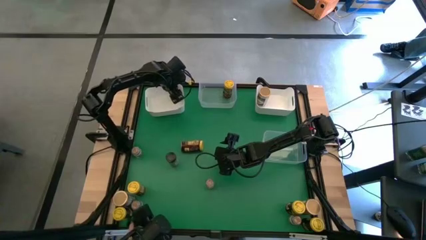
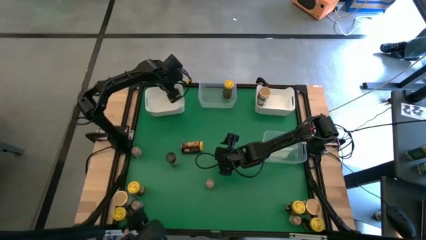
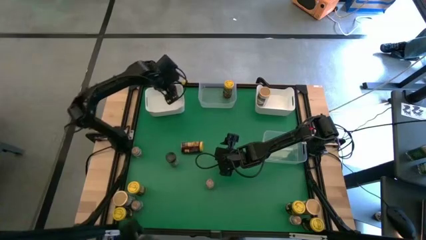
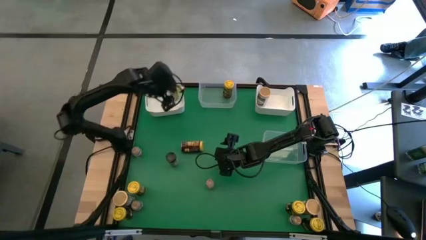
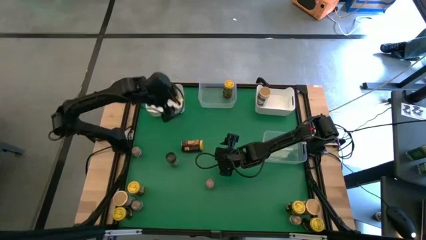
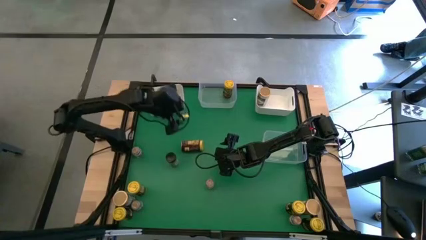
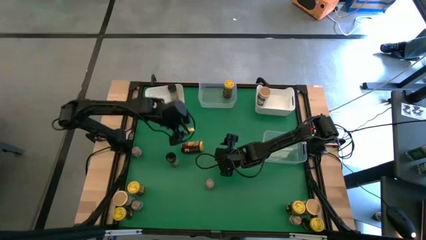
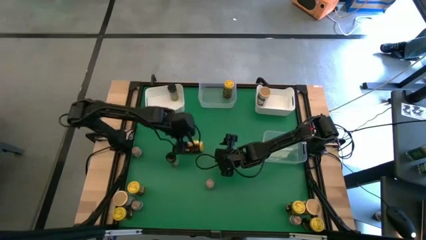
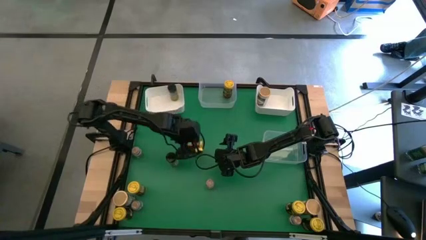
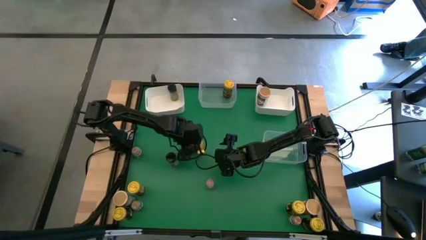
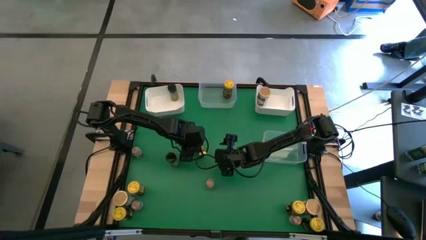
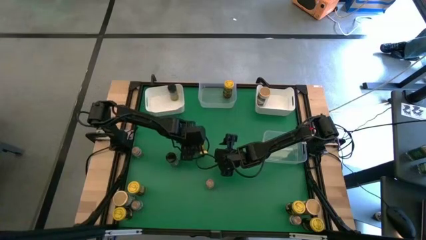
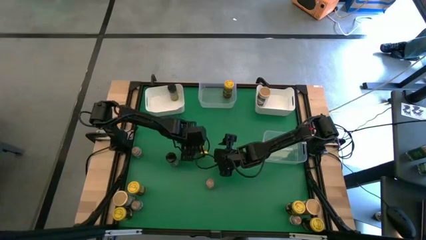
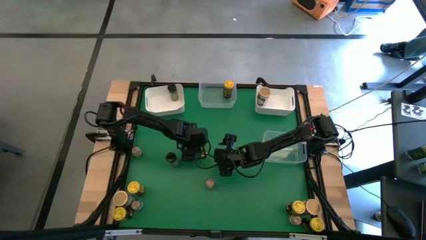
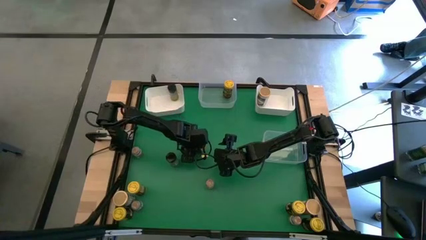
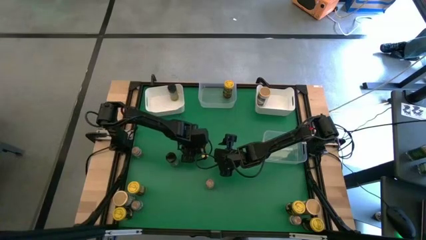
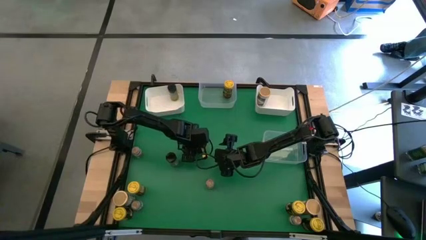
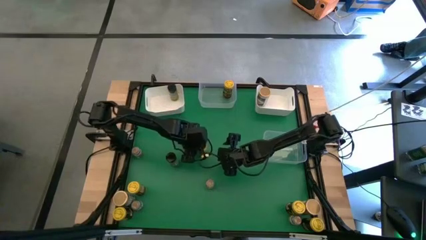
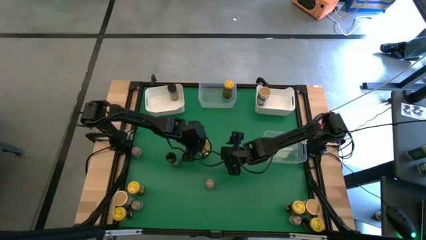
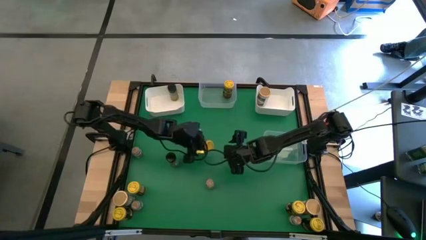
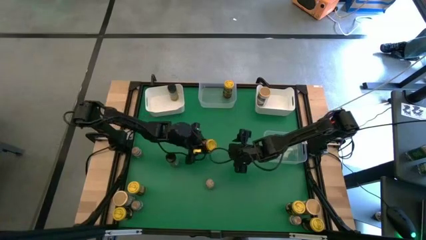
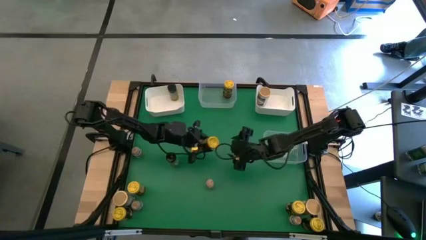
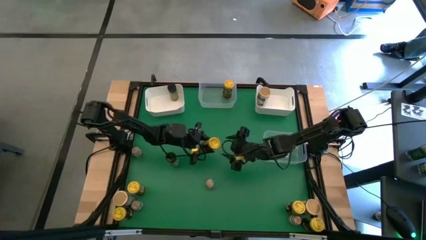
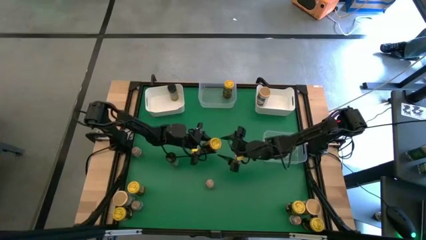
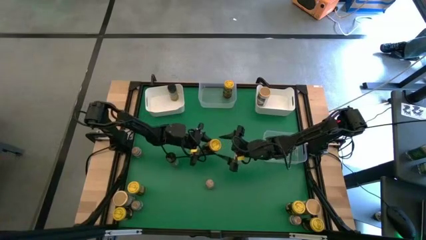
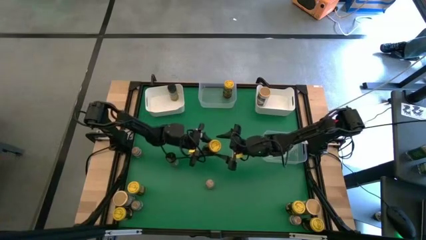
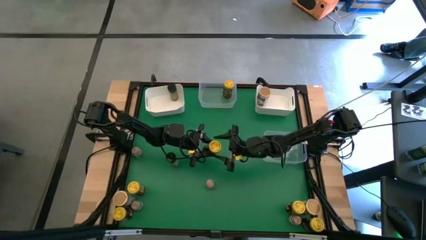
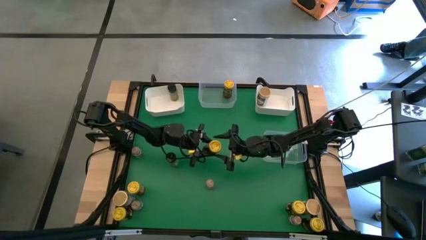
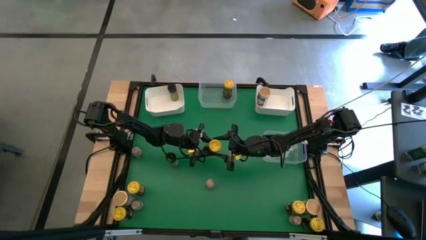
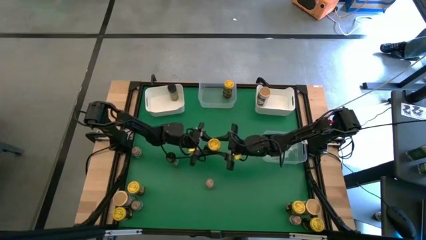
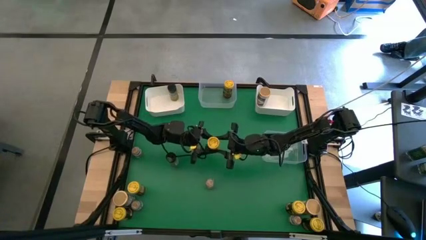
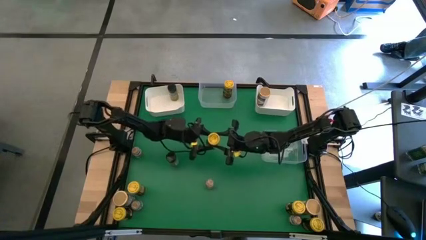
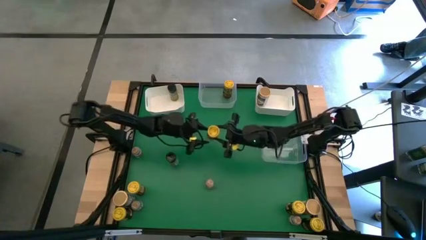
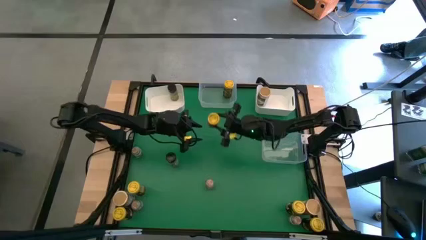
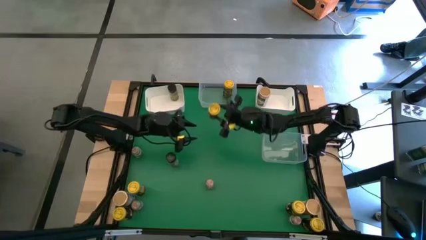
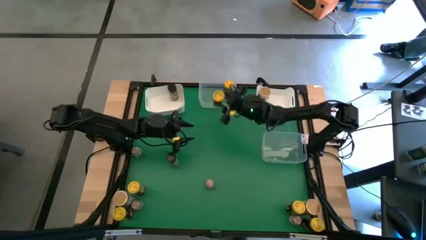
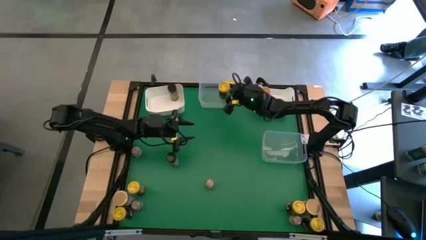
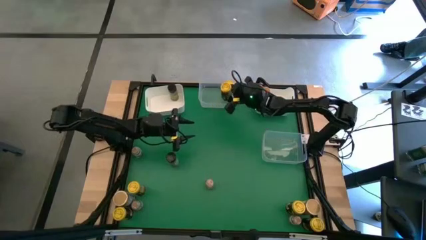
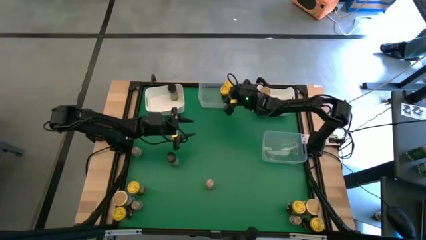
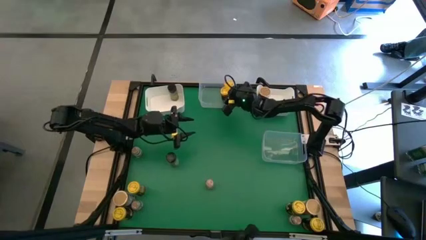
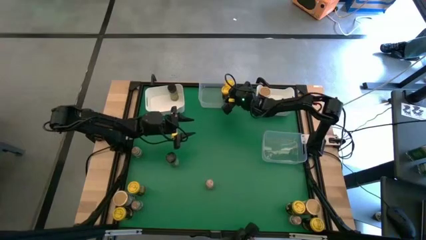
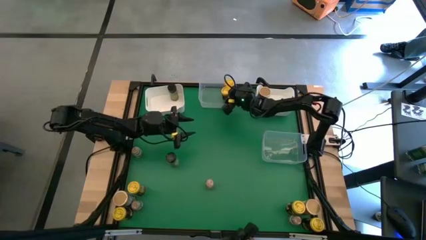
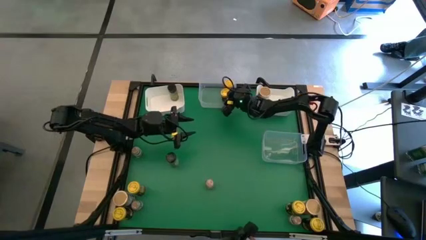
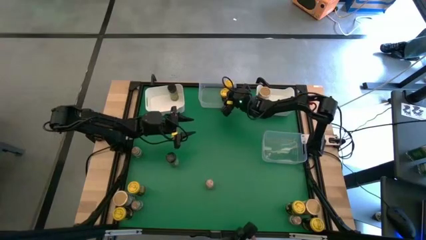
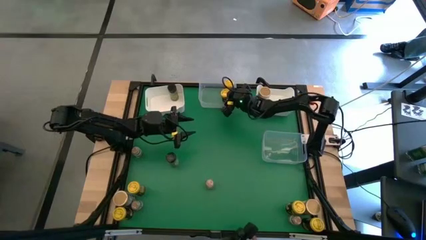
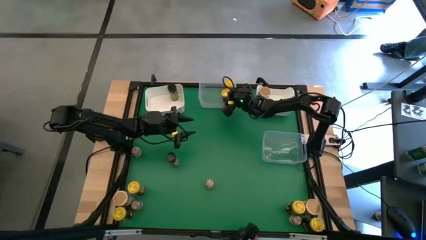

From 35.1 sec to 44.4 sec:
Task: Sort spices by type
Put the yellow seasoning bottle into the top transparent bin
